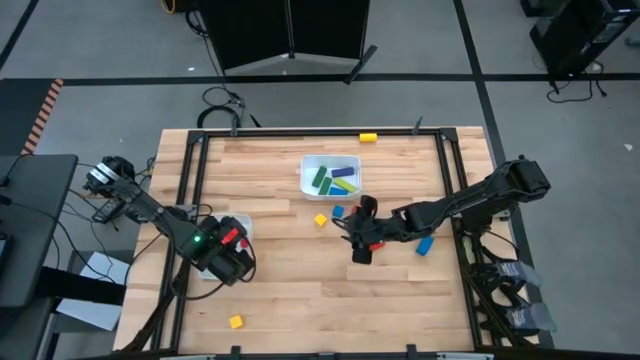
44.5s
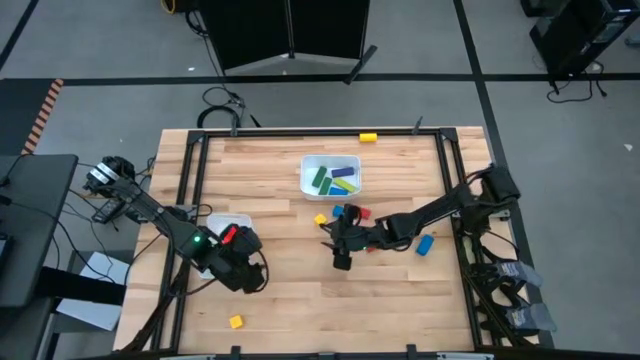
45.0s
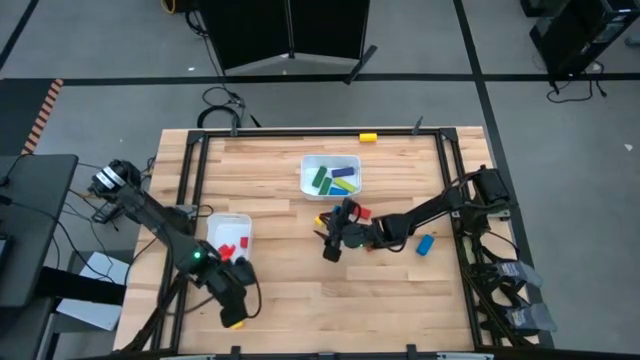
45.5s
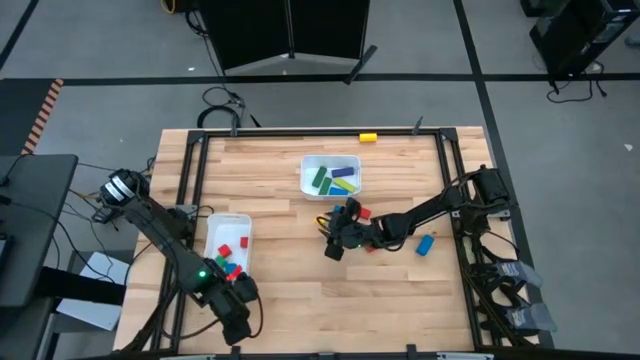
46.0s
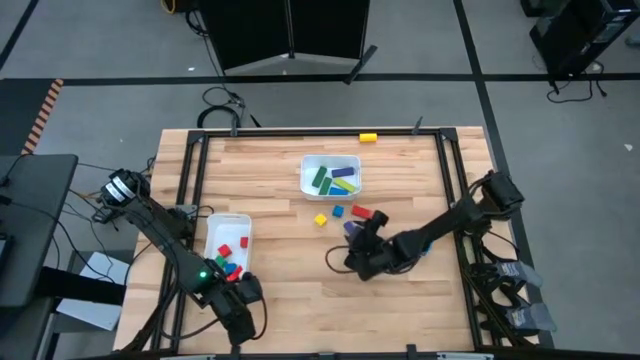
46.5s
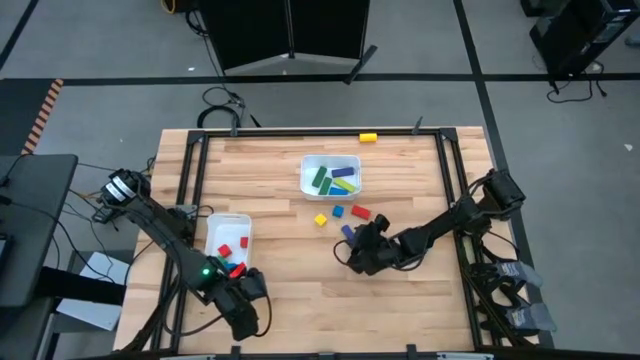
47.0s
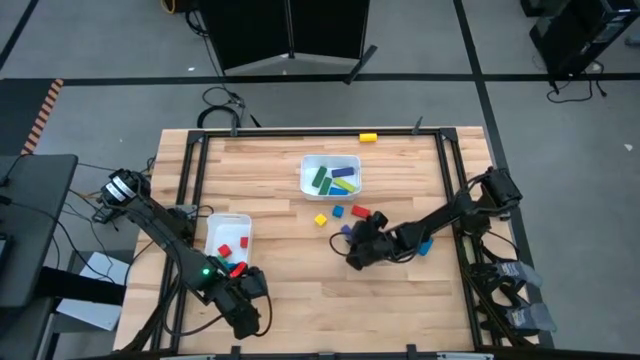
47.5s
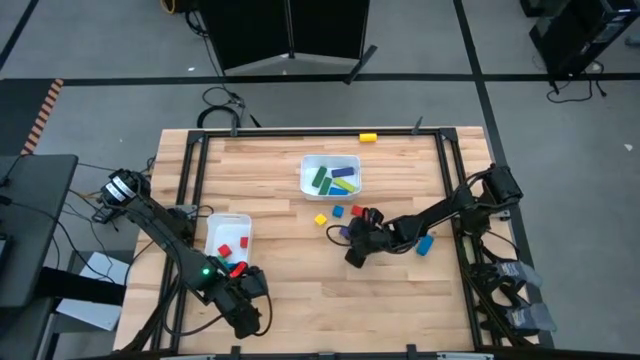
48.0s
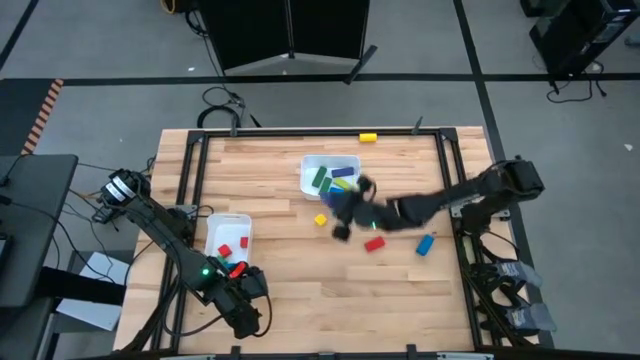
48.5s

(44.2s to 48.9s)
Task: Sort blocks by size
Put the rectangular violet block into the top white bin

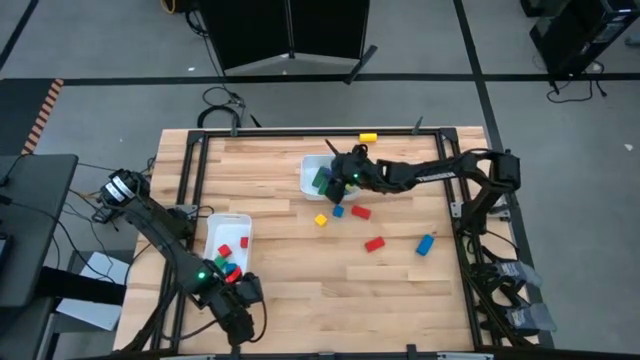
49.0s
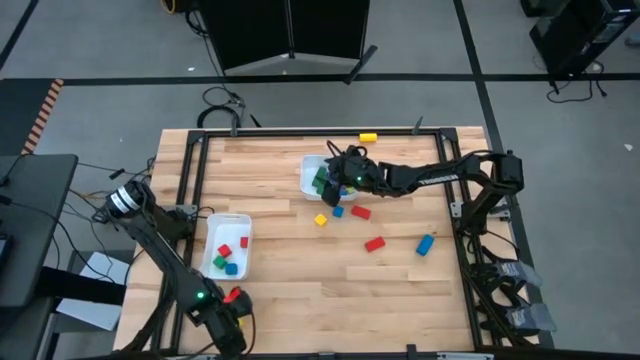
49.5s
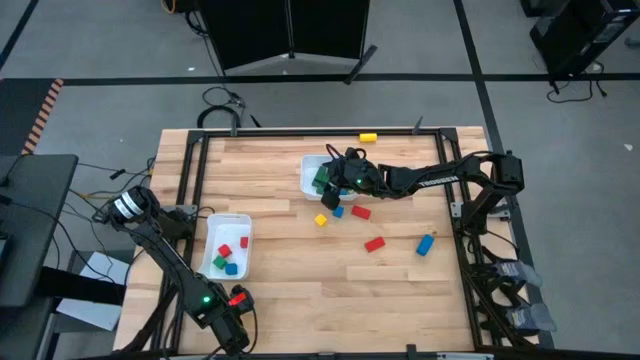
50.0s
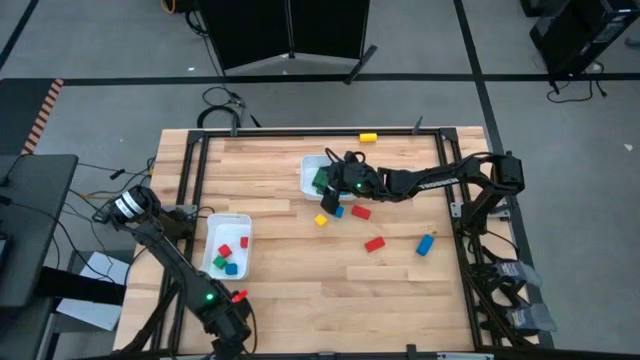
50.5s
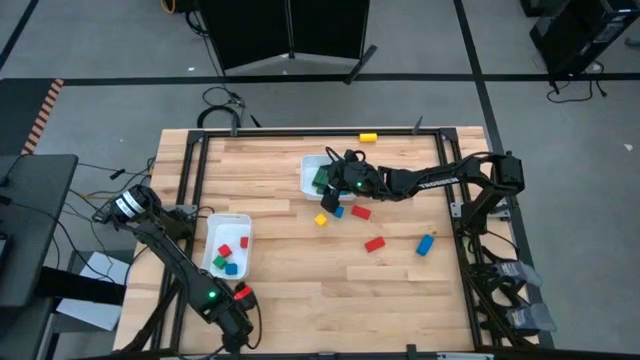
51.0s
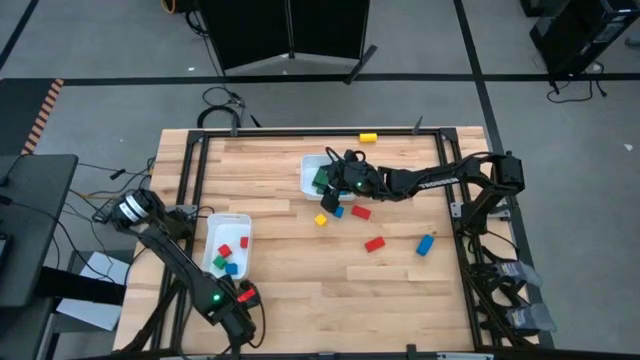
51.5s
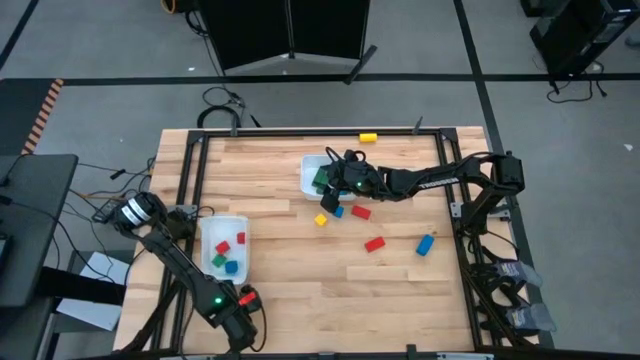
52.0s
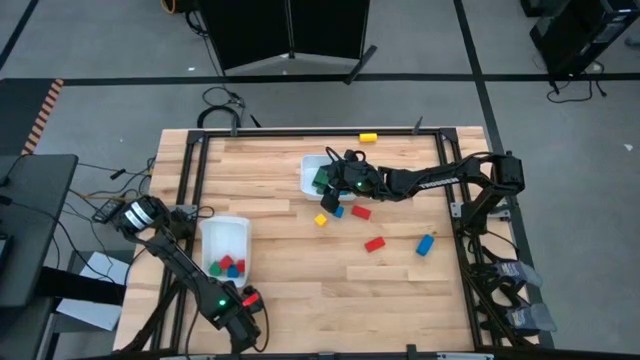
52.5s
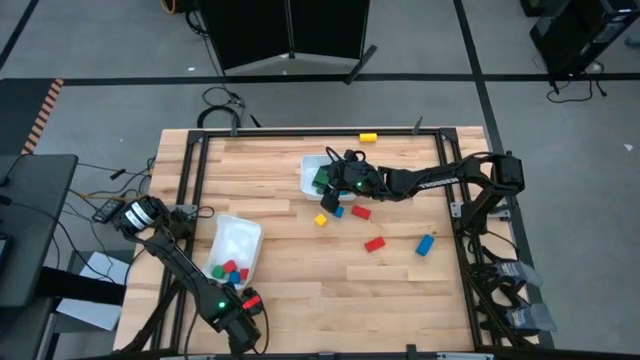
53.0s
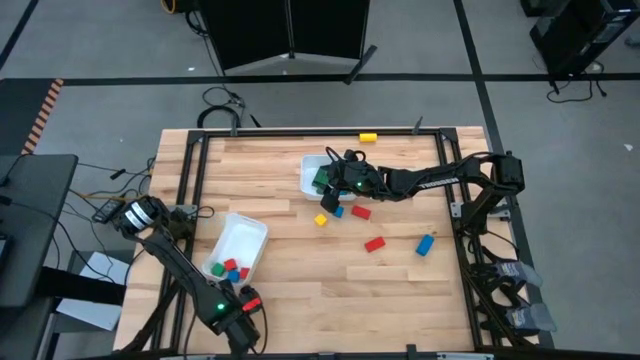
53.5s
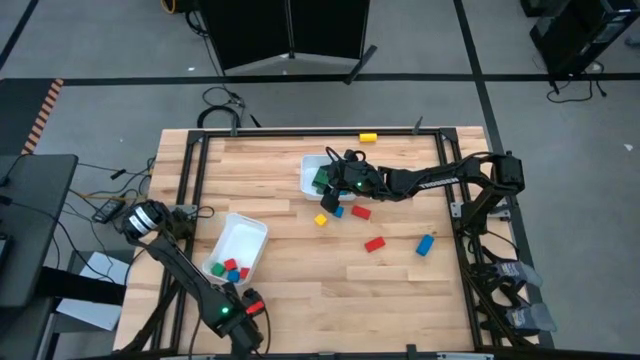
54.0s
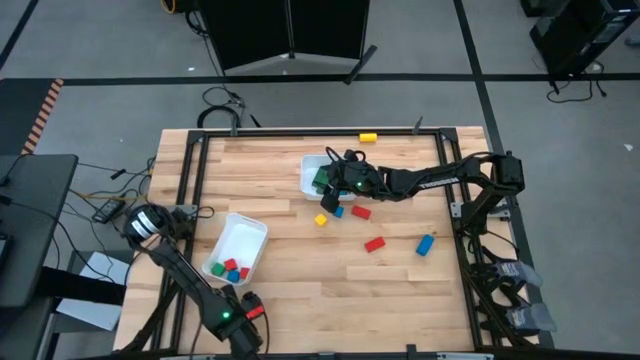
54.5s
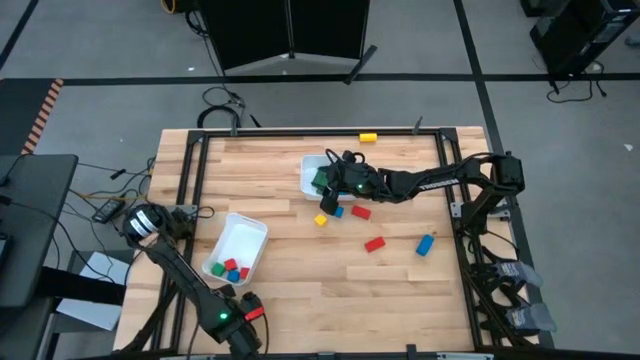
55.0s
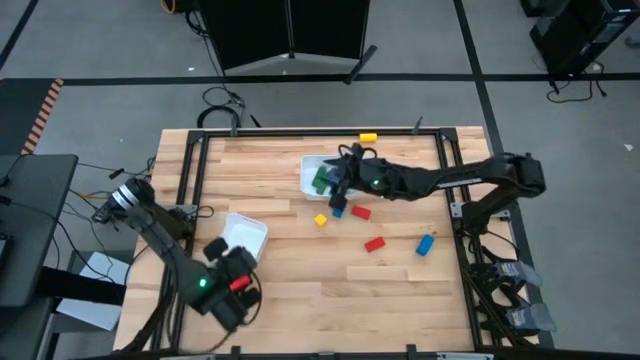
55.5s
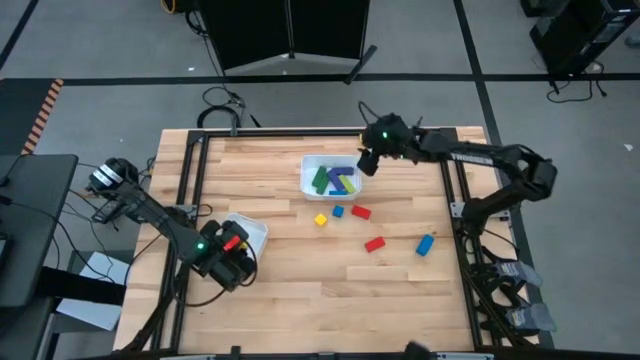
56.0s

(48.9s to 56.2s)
Put the square yellow block into the bottom white bin

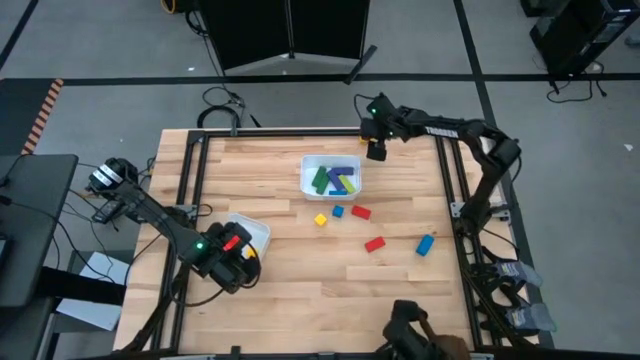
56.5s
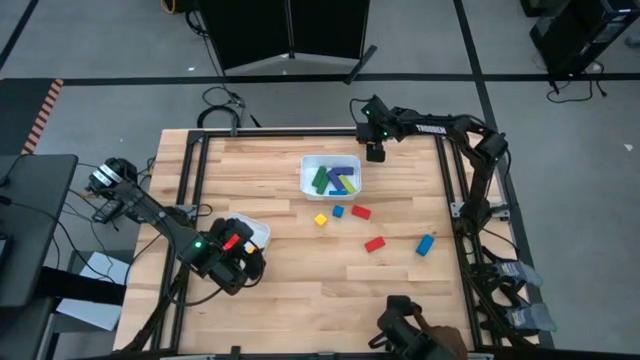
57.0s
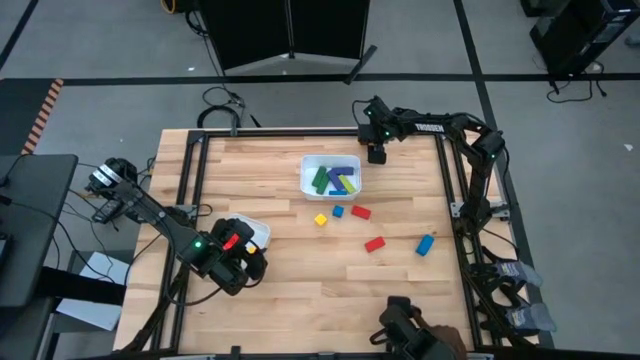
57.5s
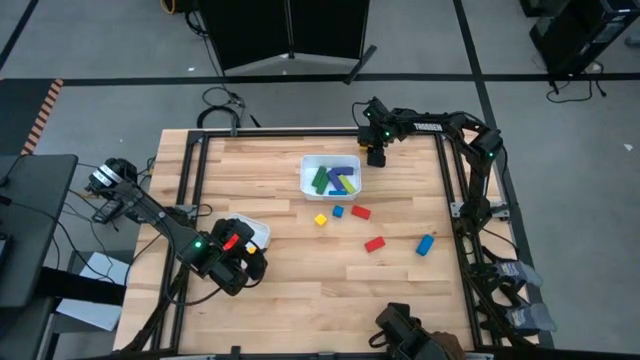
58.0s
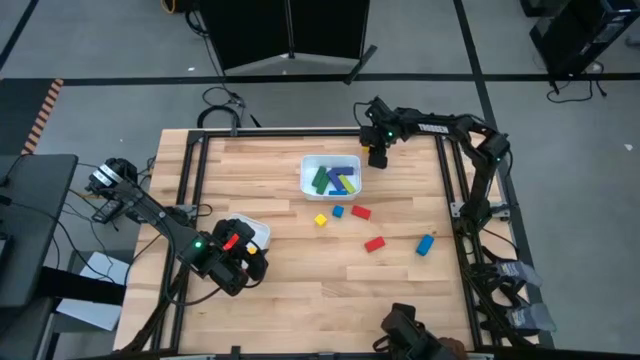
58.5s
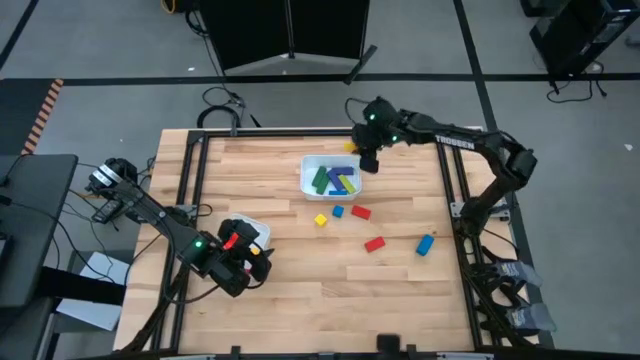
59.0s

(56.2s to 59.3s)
Put the rectangular yellow block into the top white bin

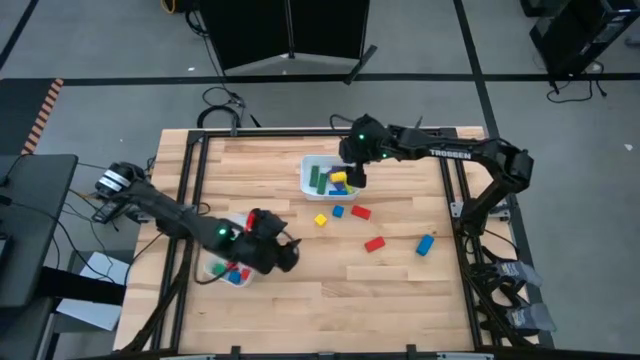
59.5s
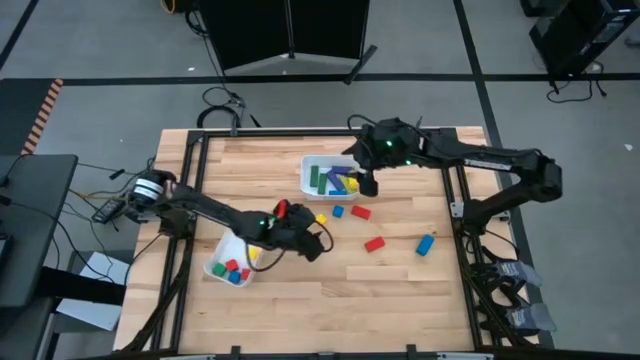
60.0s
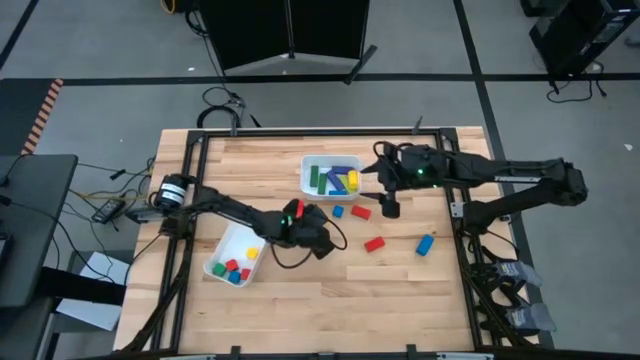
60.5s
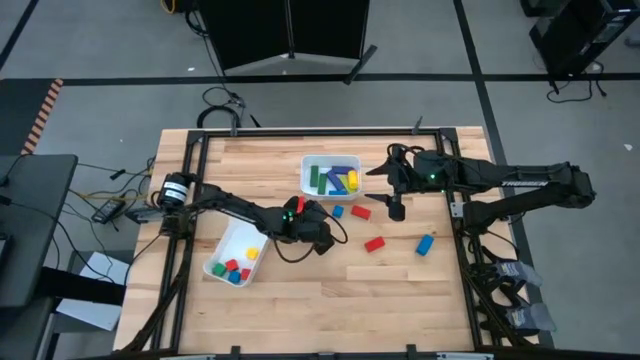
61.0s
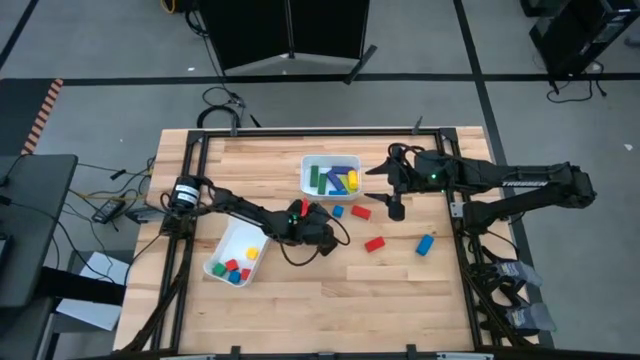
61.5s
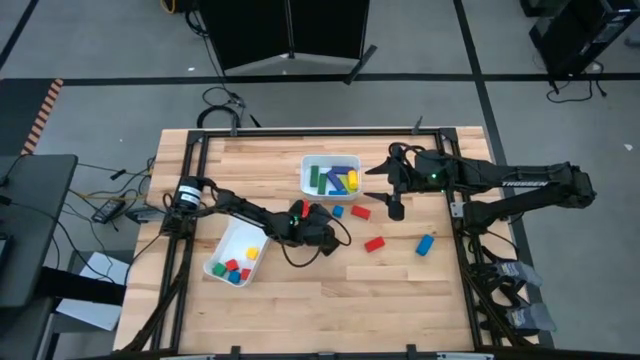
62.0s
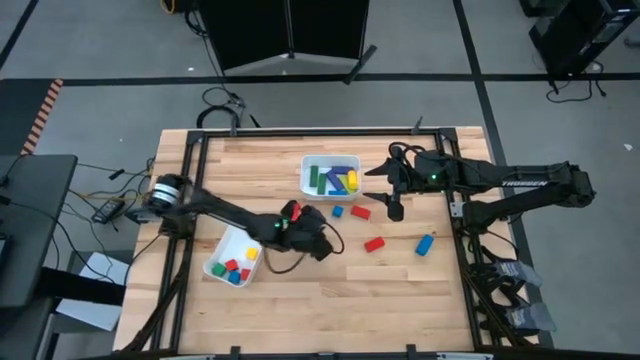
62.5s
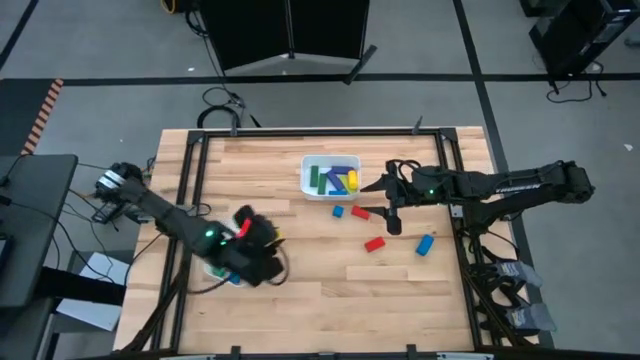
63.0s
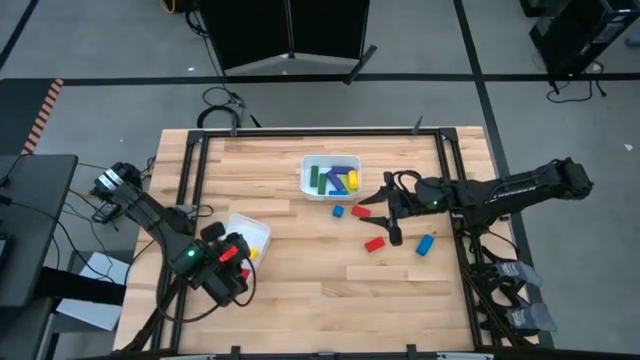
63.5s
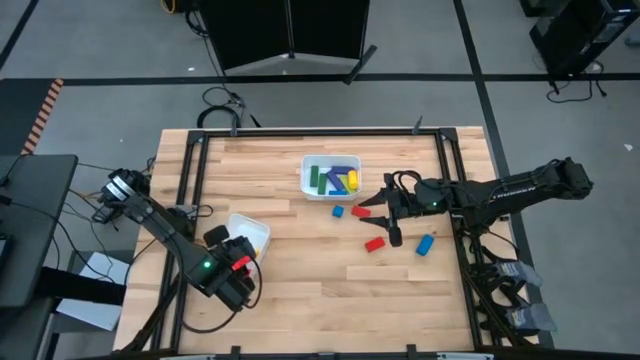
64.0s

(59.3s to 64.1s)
Put the square yellow block into the bottom white bin

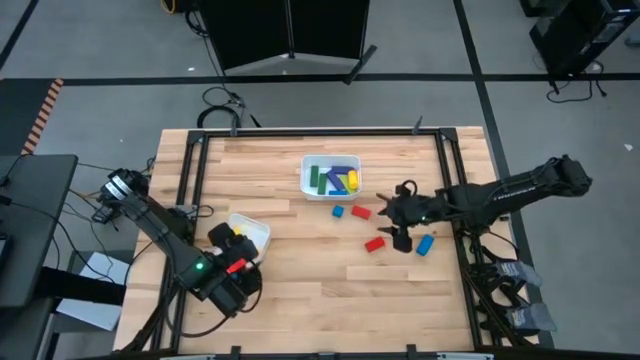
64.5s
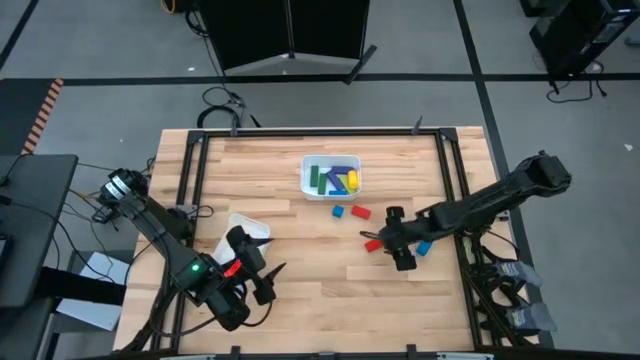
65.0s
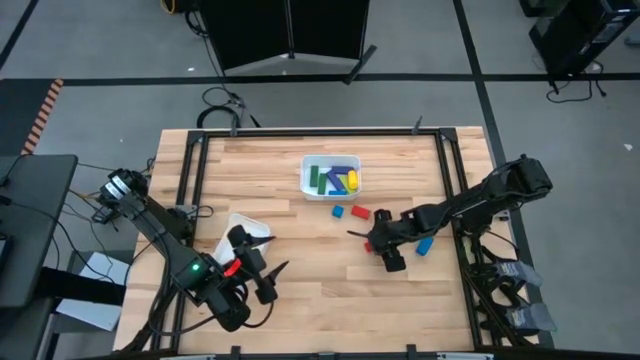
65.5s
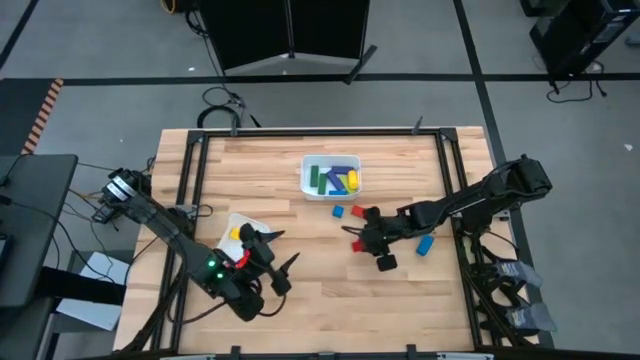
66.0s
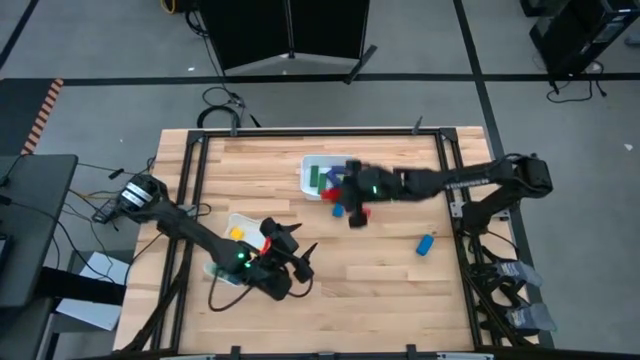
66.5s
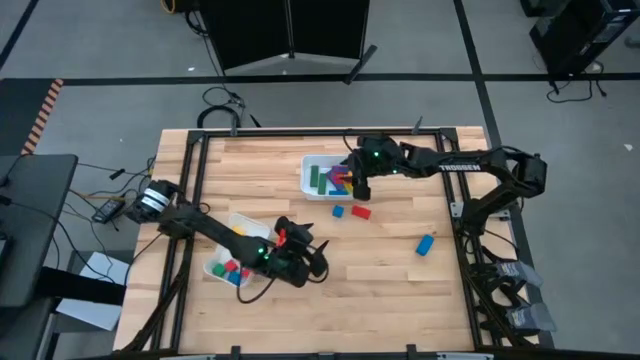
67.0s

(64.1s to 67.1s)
Put the rectangular red block into the top white bin
